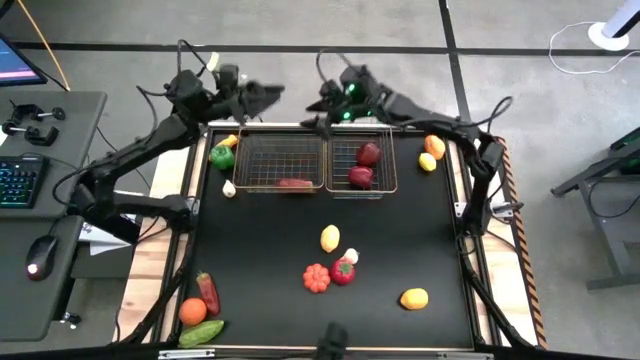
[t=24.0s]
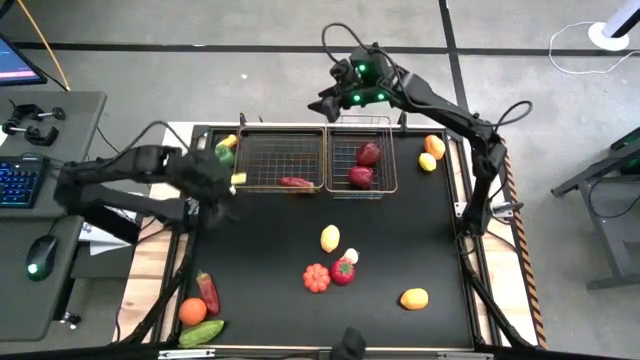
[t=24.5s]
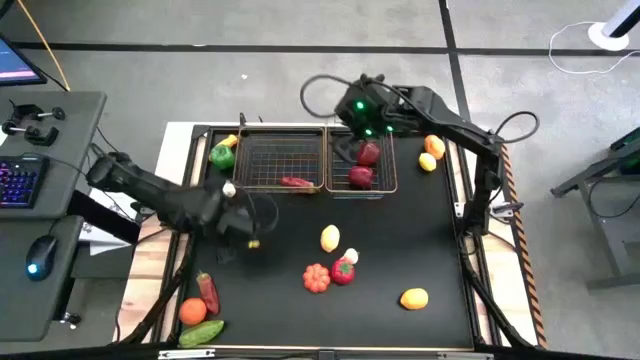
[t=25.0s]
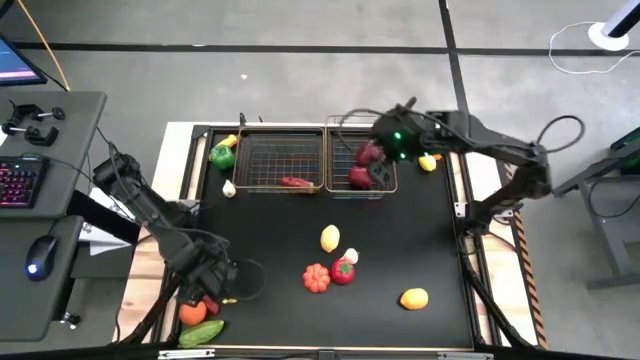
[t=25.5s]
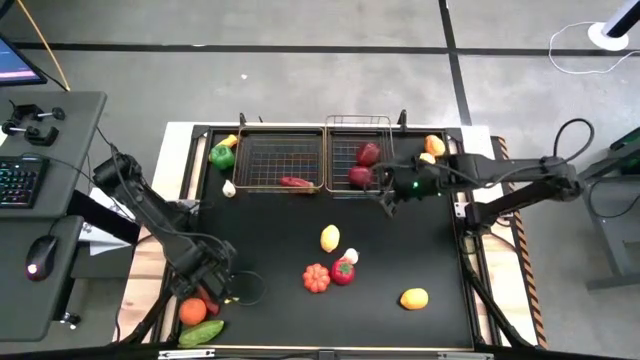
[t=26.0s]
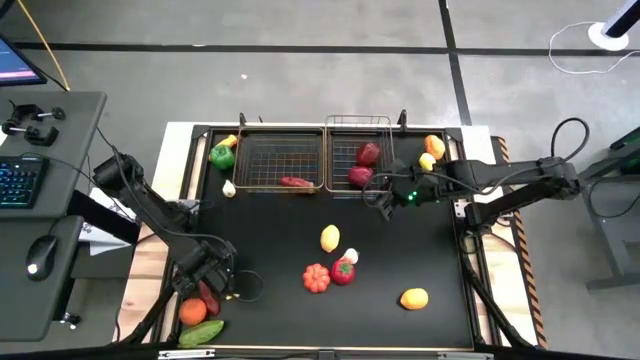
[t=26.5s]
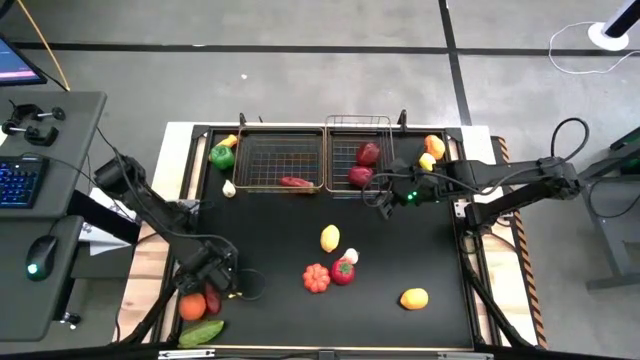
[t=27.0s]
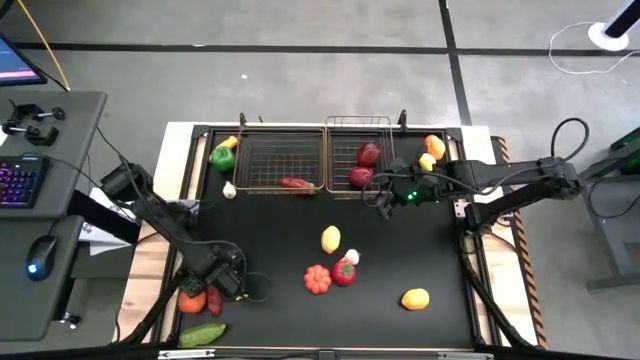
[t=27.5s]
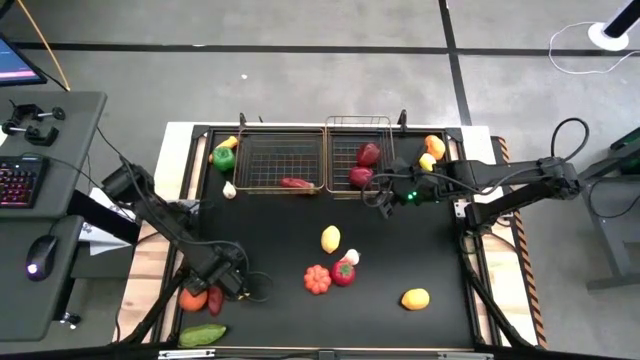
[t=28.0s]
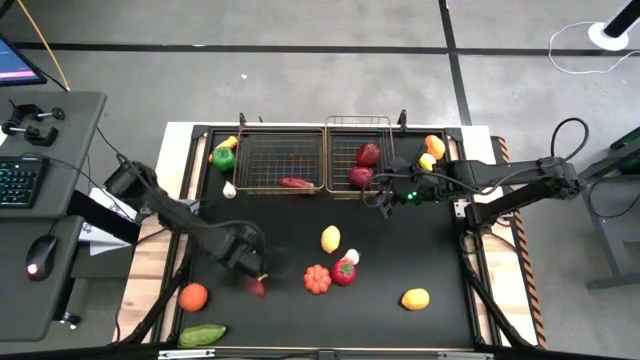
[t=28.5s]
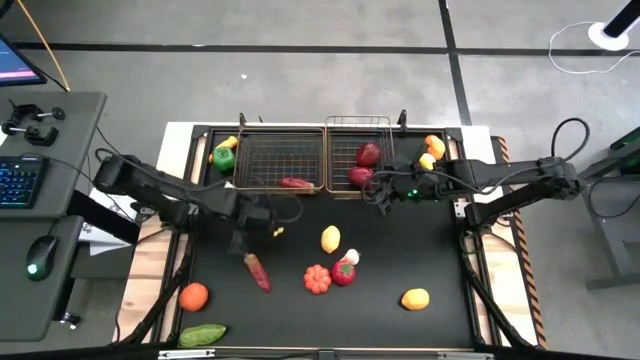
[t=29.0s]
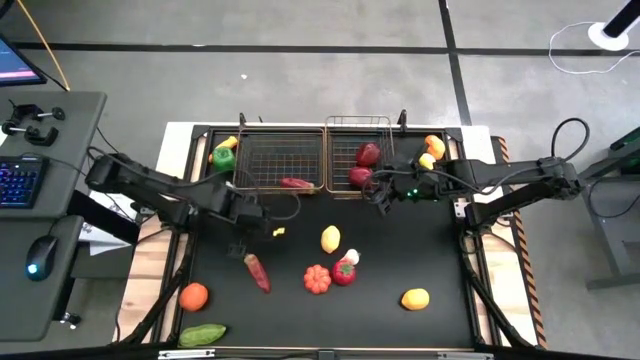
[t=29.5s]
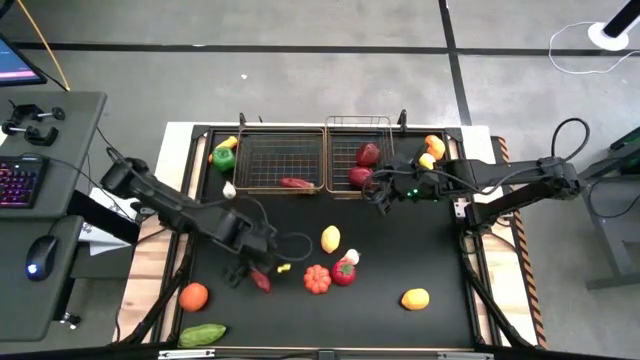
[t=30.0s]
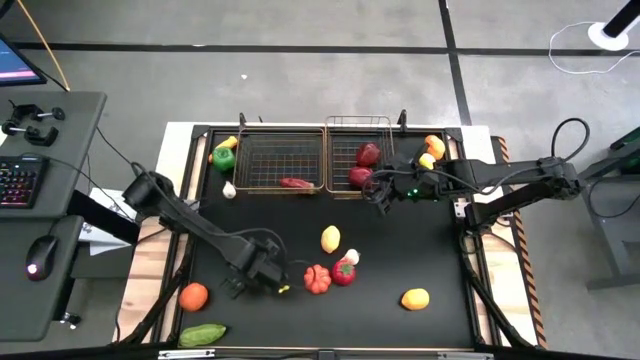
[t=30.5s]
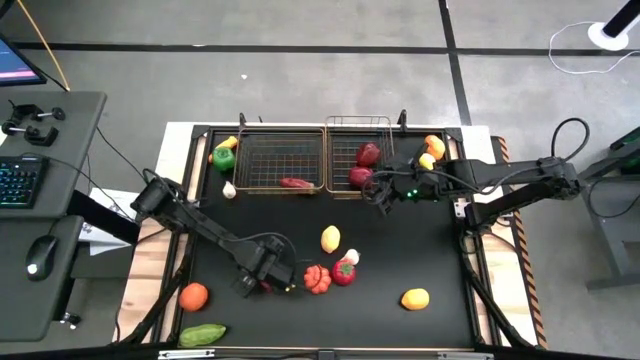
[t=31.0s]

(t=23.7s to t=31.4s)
Task: Sort produce into baskets
Put the bottom red chili pepper into the left wire basket

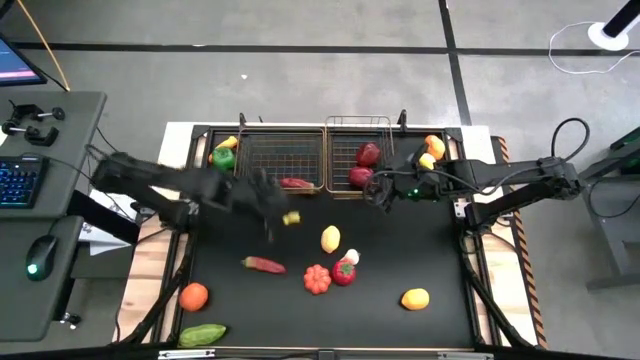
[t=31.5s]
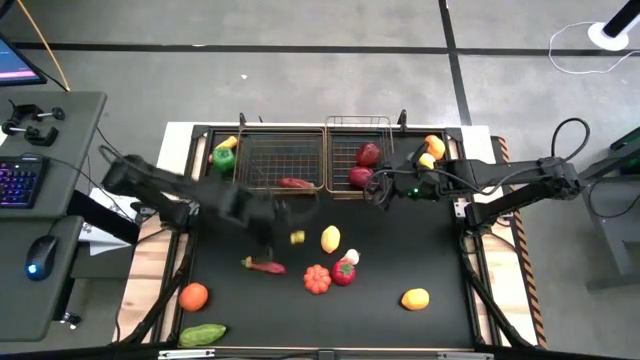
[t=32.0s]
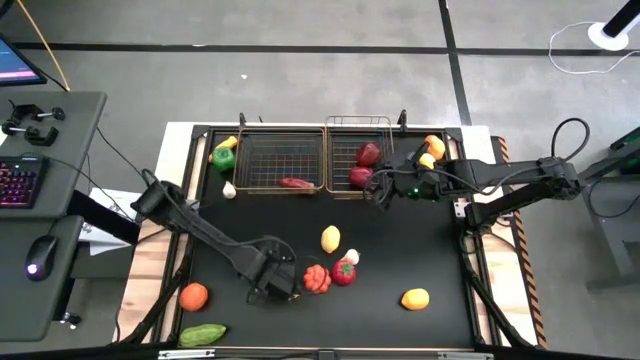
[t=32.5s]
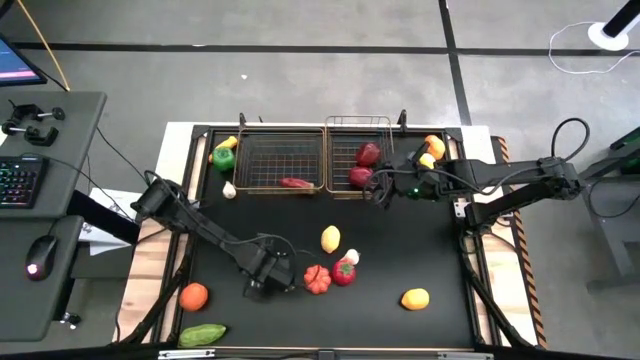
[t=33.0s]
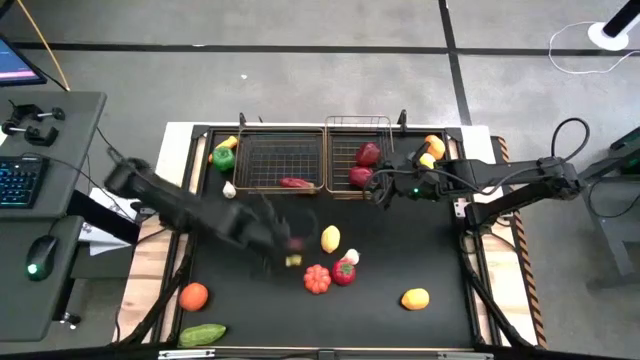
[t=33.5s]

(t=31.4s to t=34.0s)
Put the bottom red chili pepper into the left wire basket

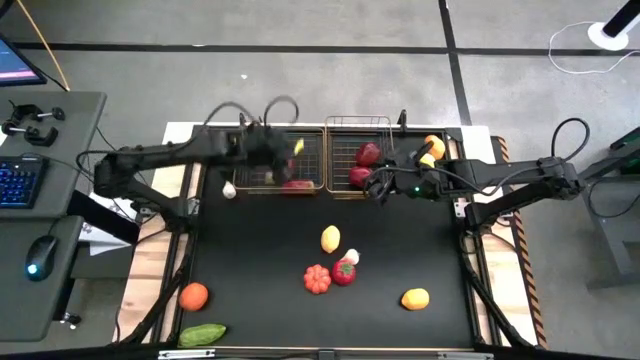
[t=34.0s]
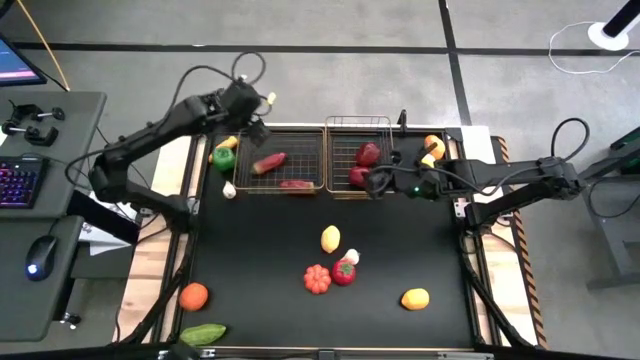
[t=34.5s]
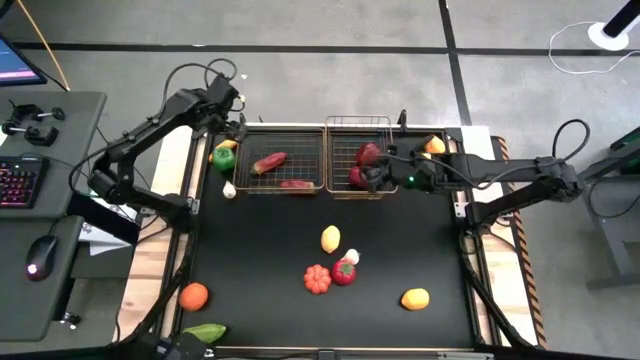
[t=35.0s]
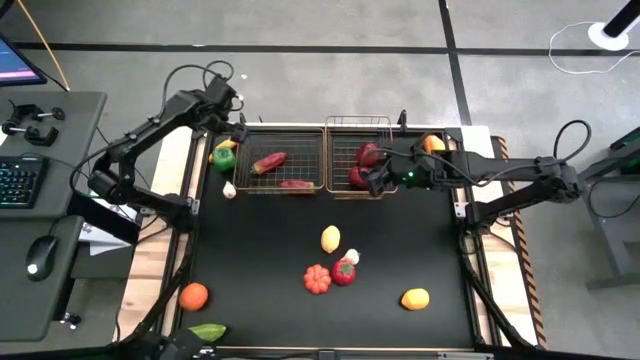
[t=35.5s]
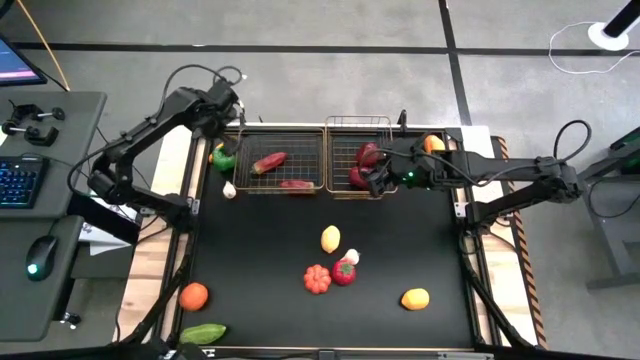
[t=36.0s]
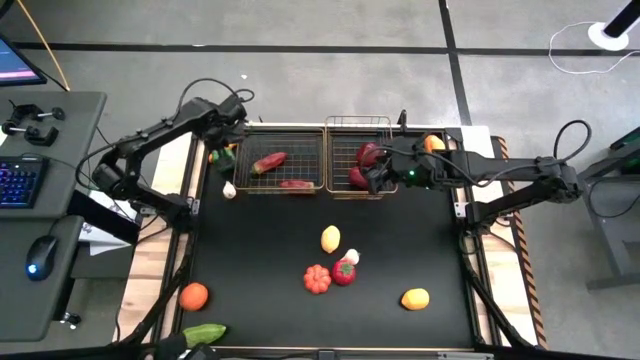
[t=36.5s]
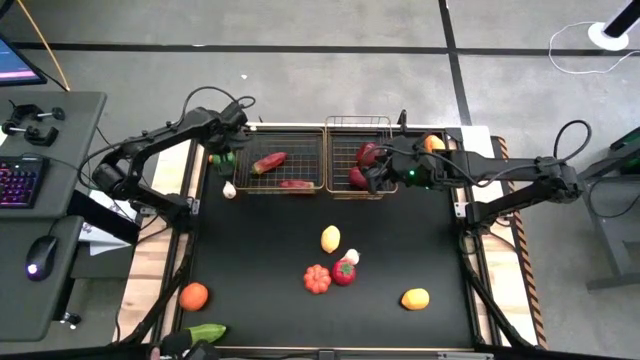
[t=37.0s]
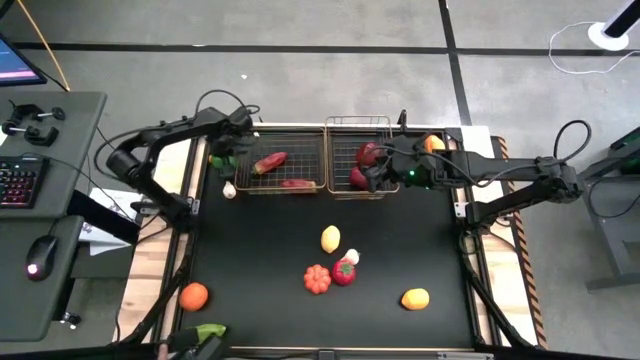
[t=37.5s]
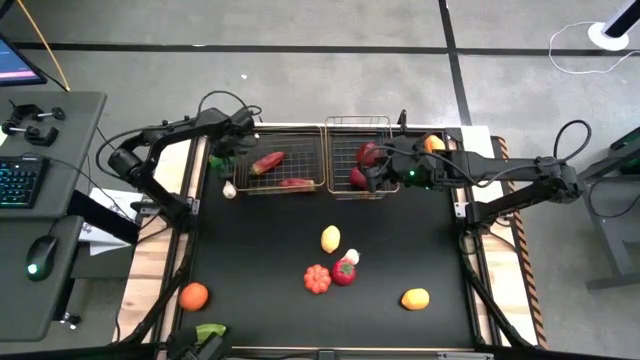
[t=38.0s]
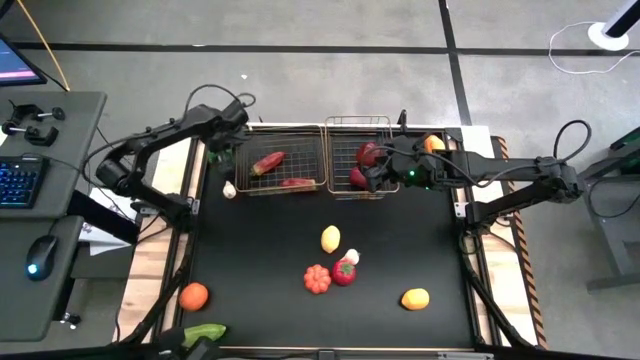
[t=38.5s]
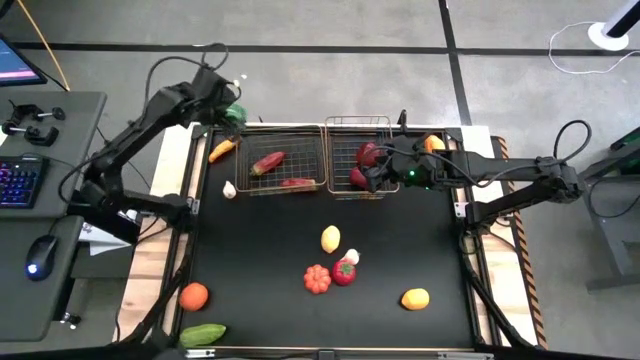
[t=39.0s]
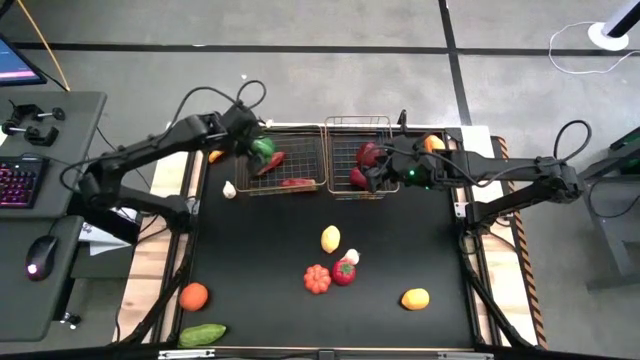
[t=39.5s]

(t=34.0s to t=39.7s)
Put the green bell pepper into the left wire basket

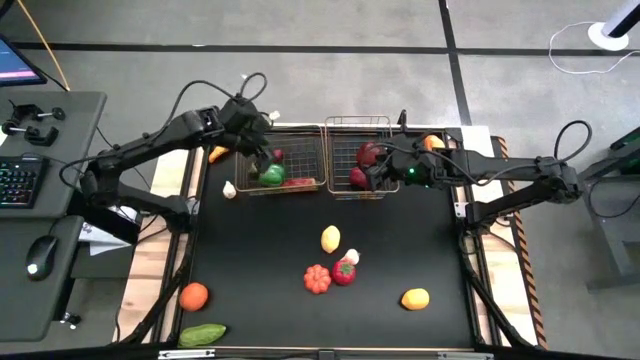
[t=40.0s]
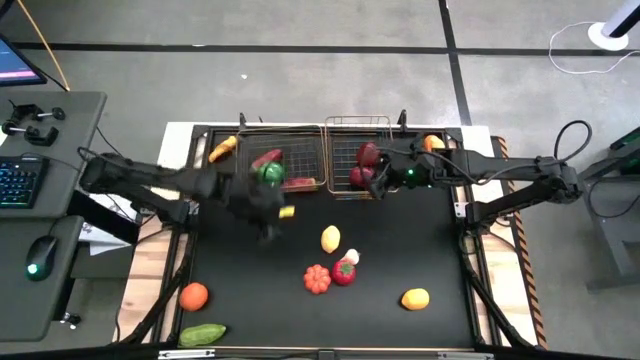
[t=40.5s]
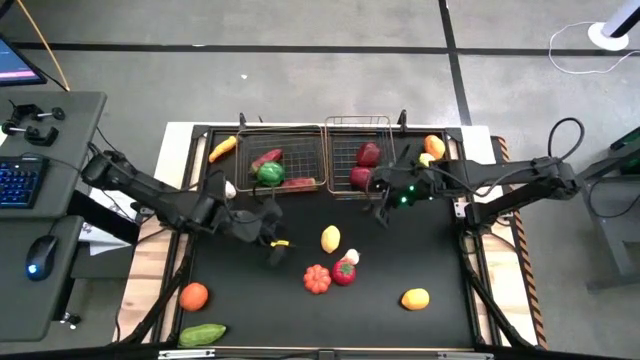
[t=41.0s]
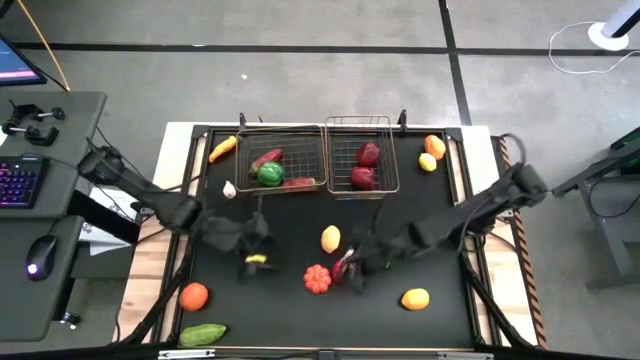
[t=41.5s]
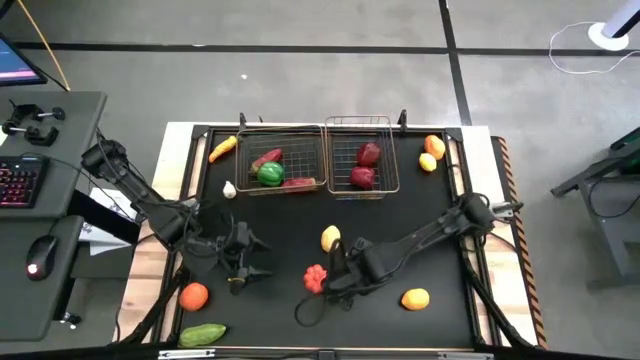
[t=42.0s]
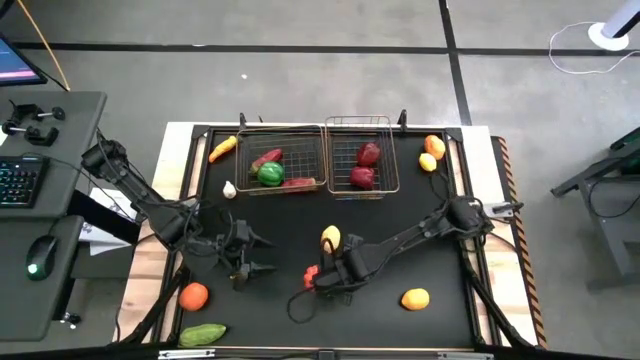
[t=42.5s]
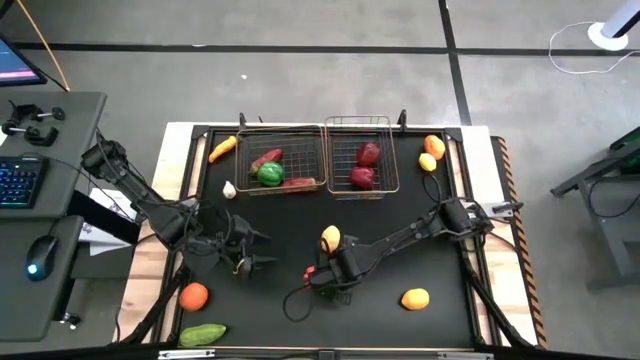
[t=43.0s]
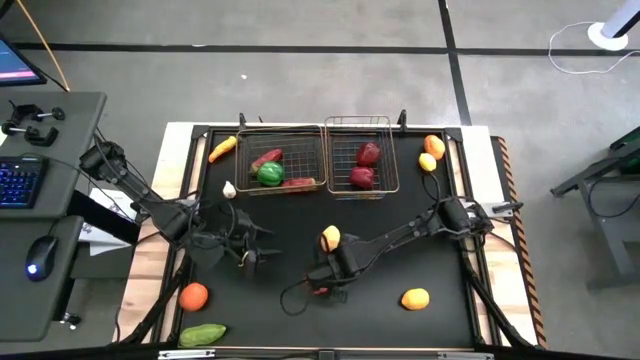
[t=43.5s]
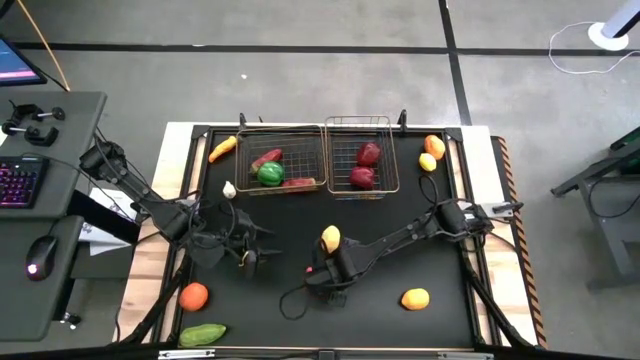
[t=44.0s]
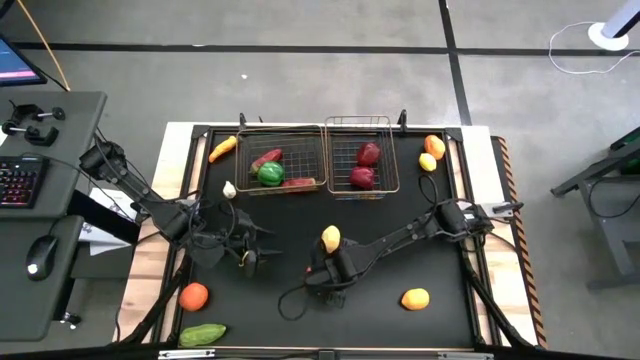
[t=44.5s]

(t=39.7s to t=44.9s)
Put the red tomato into the right wire basket
